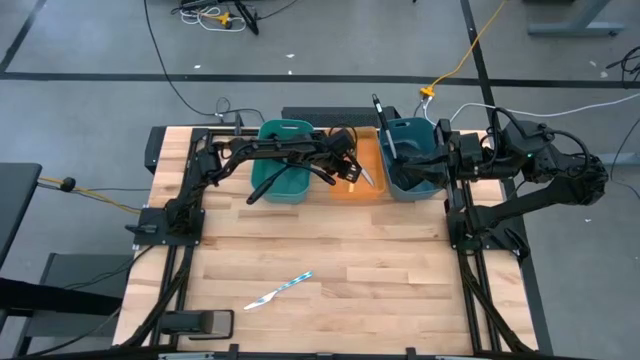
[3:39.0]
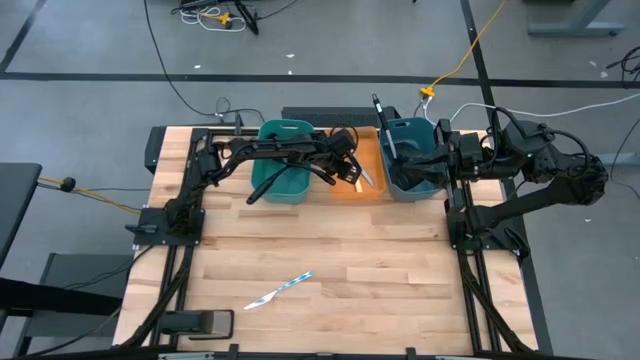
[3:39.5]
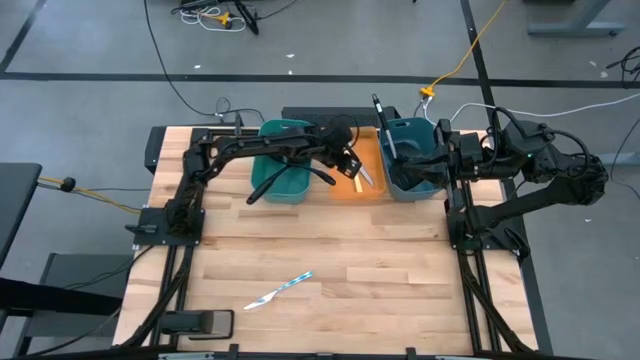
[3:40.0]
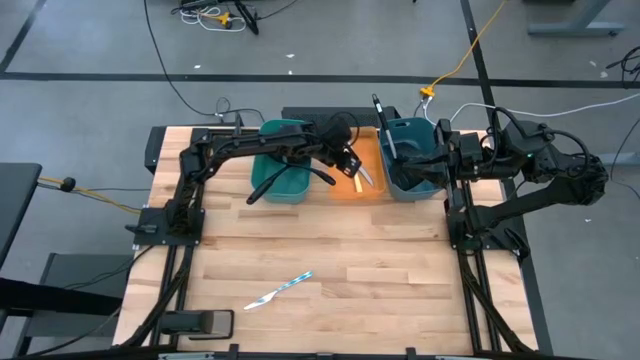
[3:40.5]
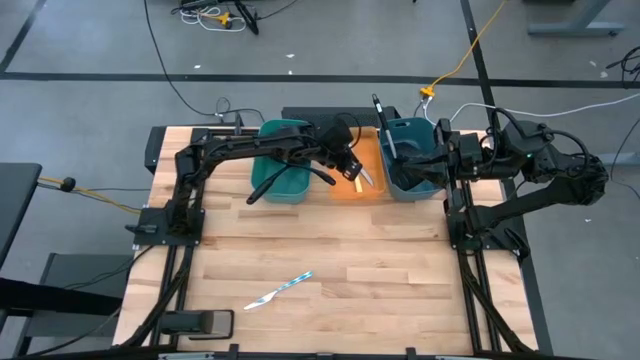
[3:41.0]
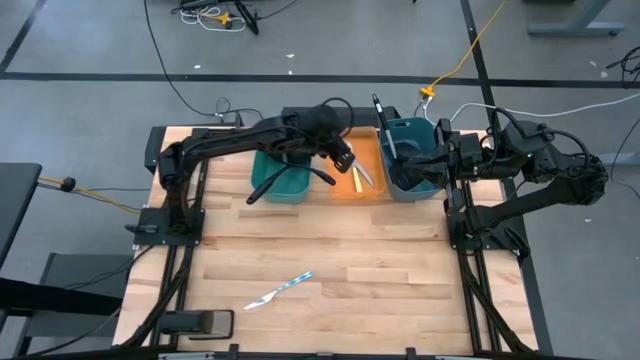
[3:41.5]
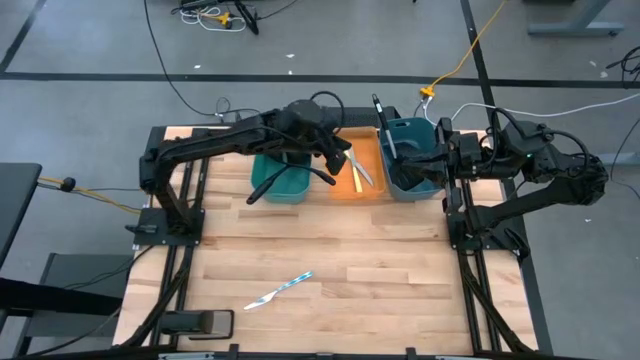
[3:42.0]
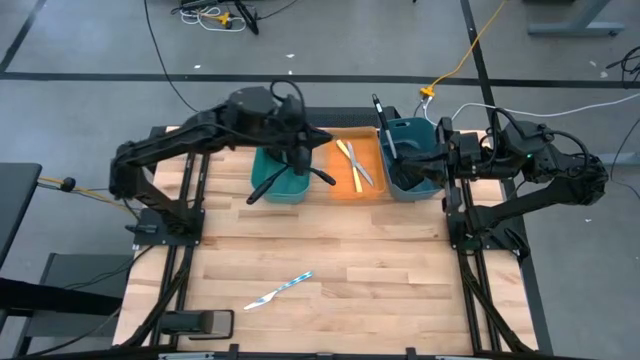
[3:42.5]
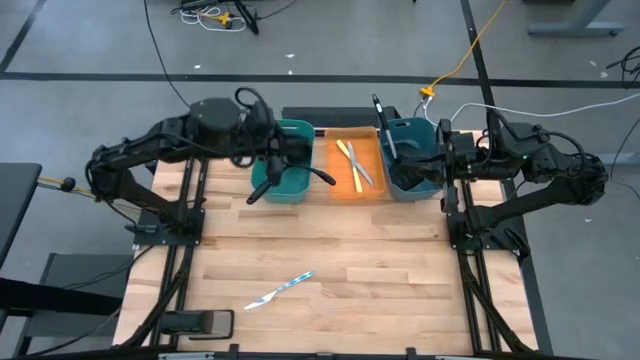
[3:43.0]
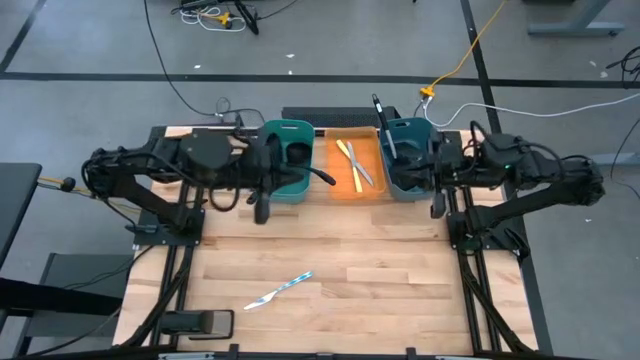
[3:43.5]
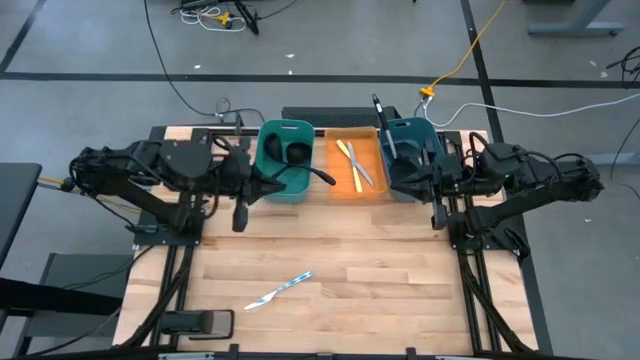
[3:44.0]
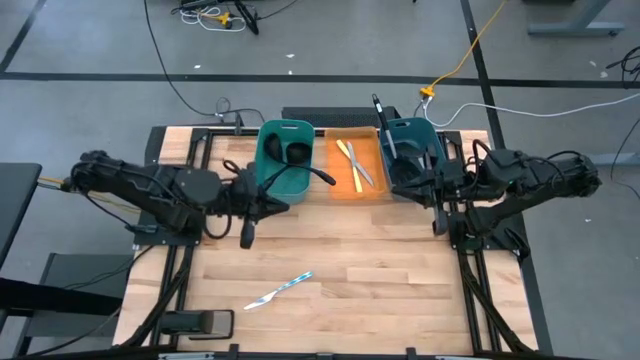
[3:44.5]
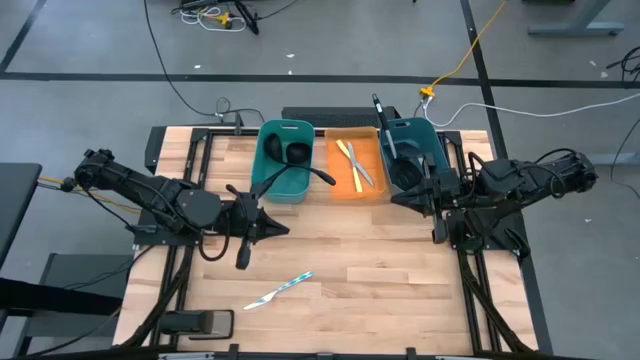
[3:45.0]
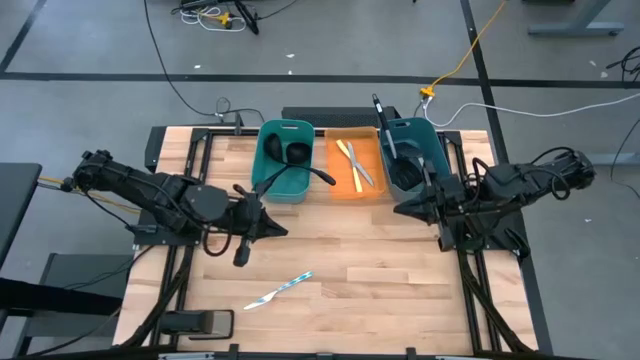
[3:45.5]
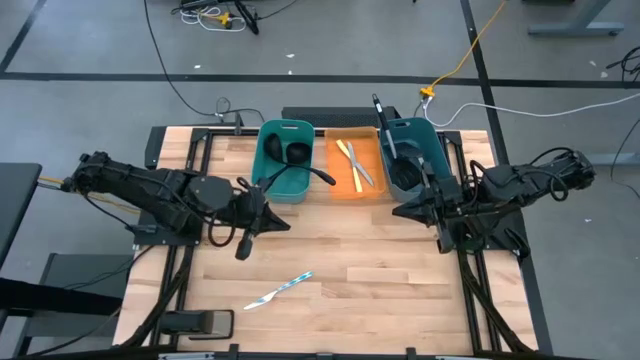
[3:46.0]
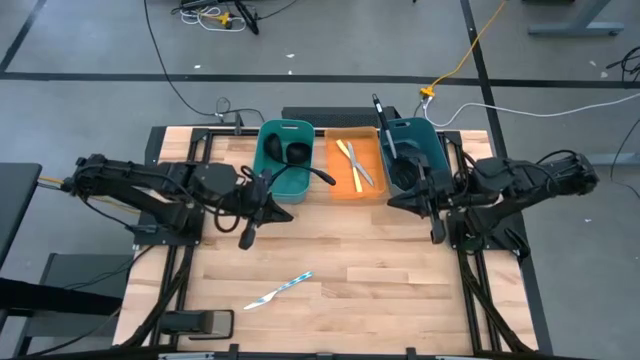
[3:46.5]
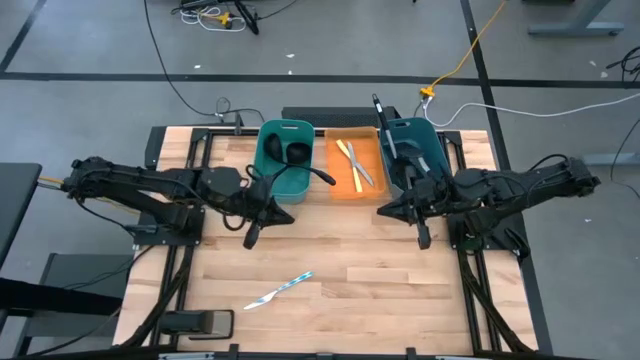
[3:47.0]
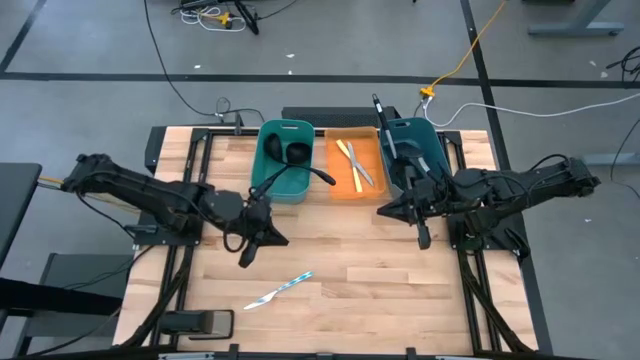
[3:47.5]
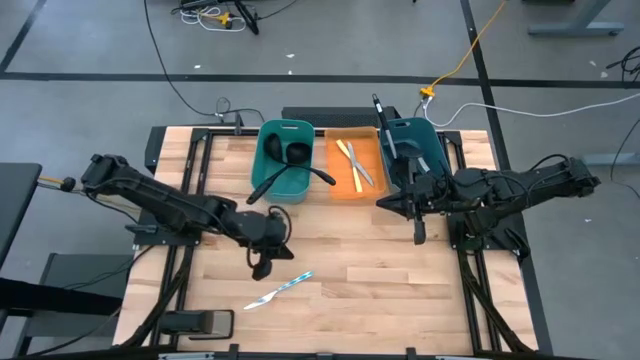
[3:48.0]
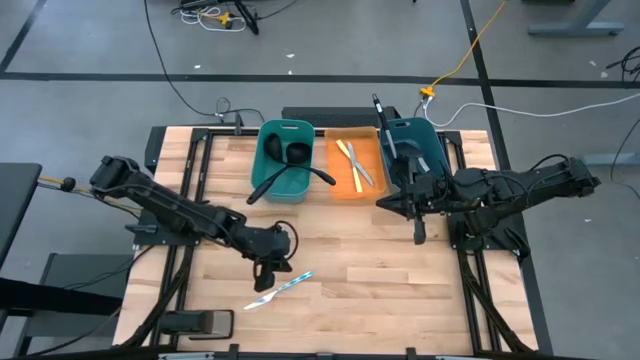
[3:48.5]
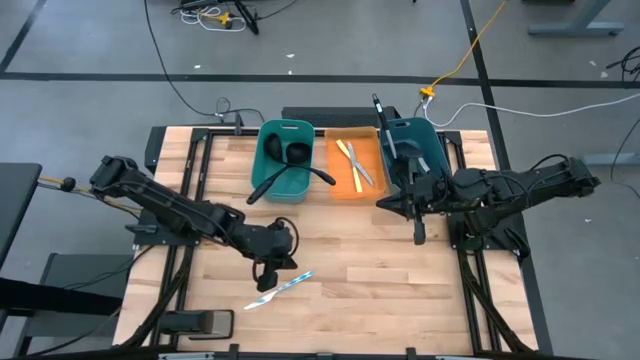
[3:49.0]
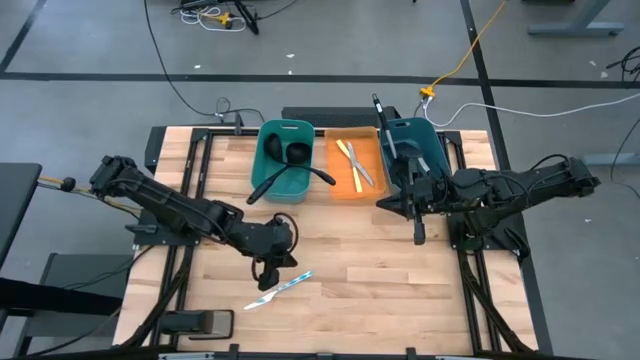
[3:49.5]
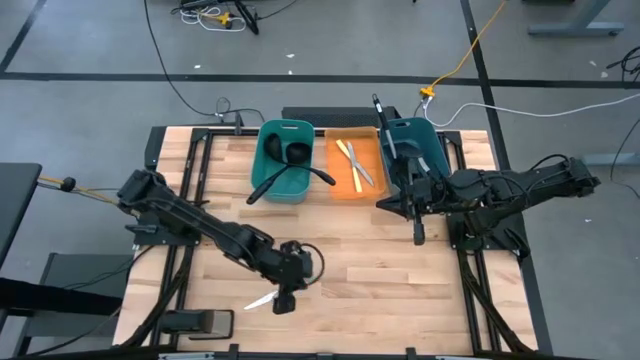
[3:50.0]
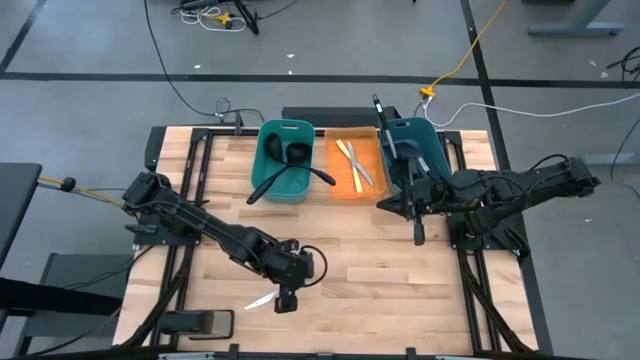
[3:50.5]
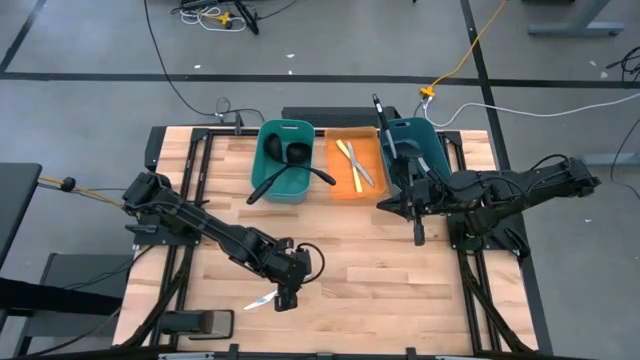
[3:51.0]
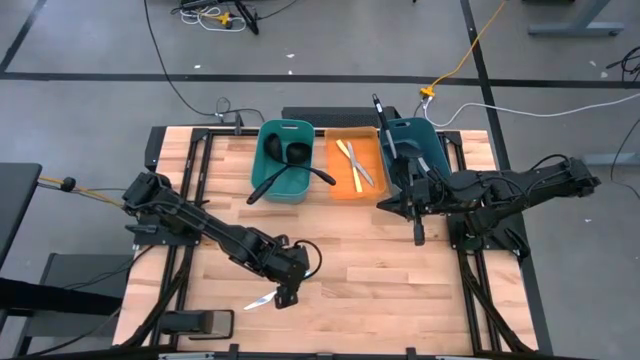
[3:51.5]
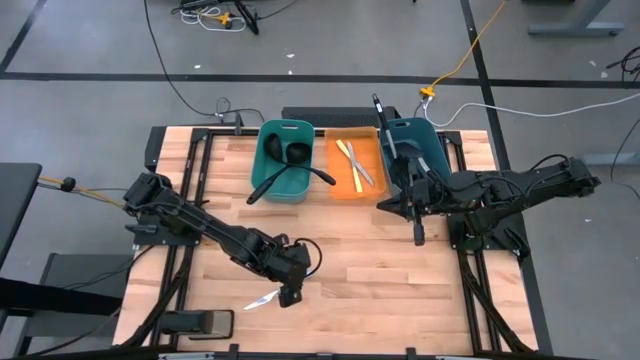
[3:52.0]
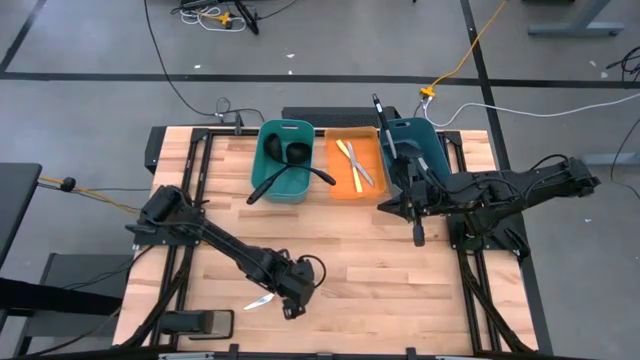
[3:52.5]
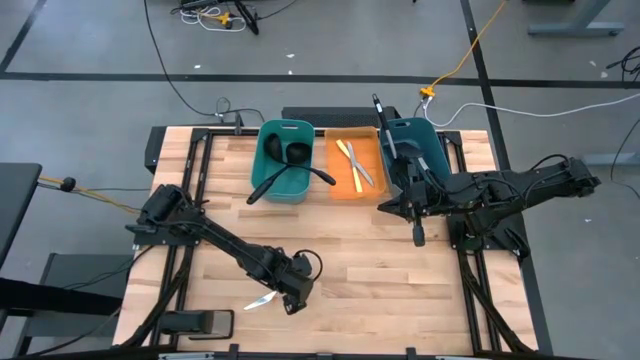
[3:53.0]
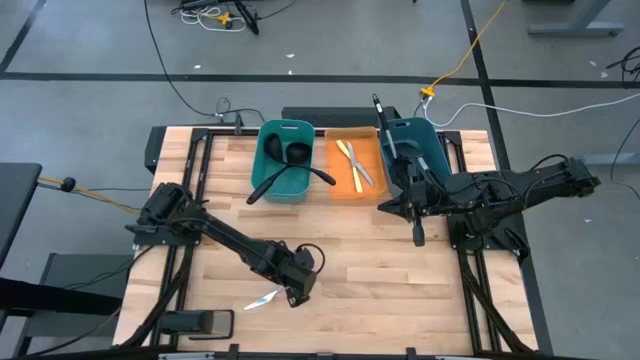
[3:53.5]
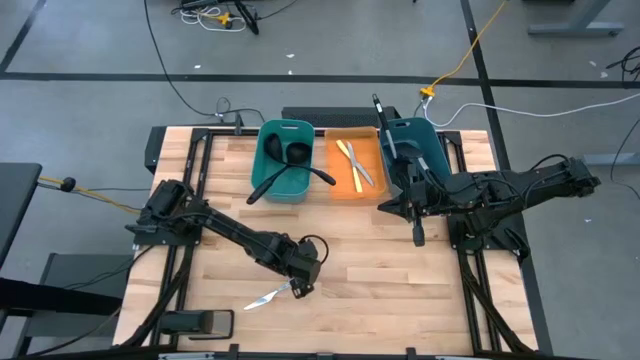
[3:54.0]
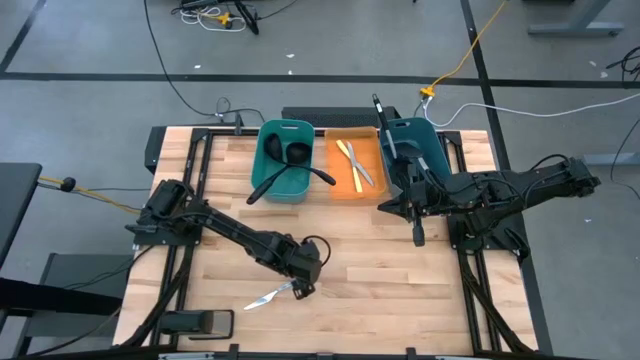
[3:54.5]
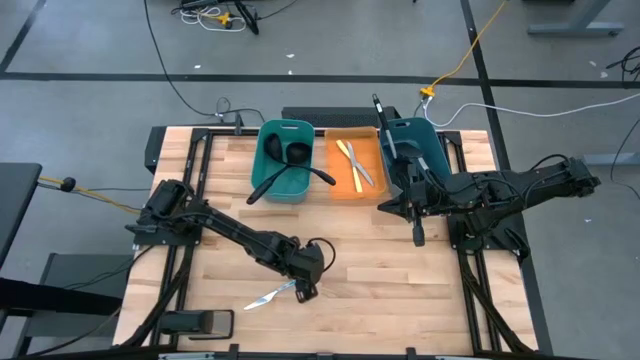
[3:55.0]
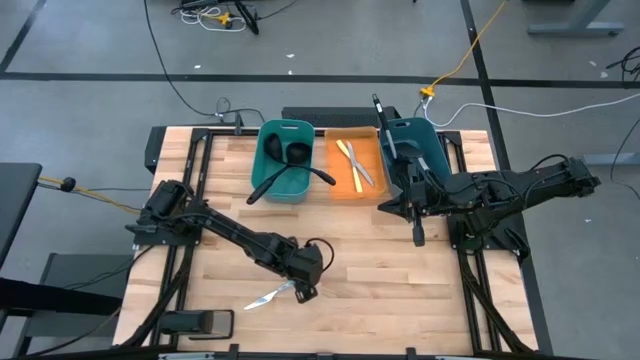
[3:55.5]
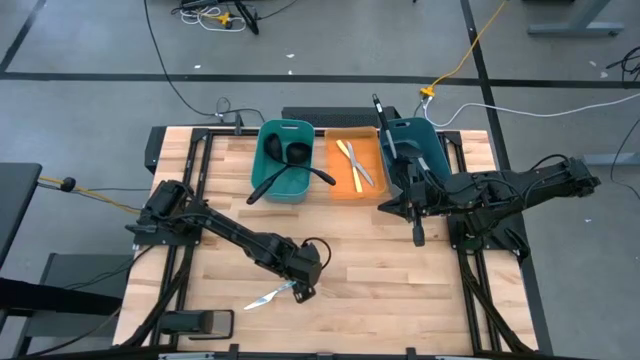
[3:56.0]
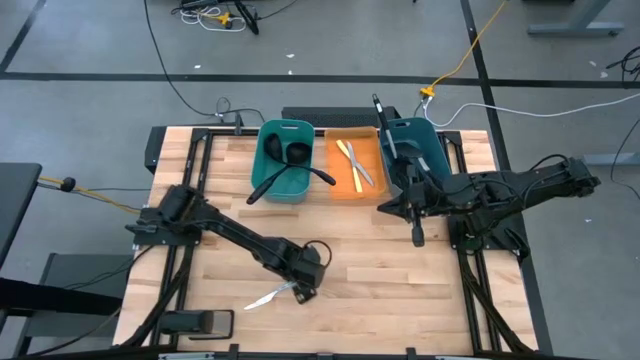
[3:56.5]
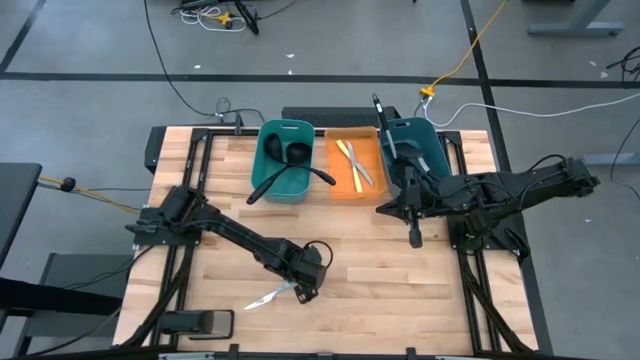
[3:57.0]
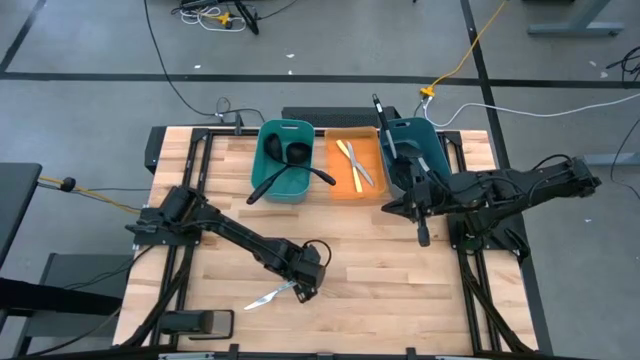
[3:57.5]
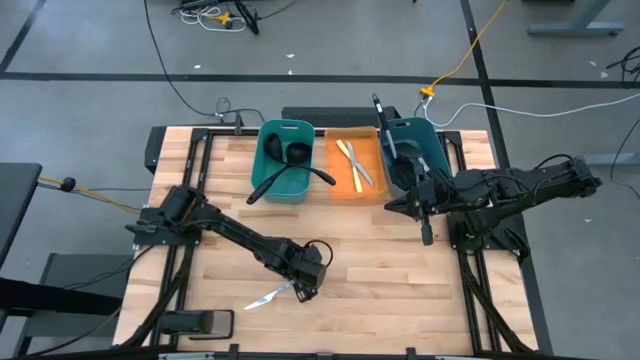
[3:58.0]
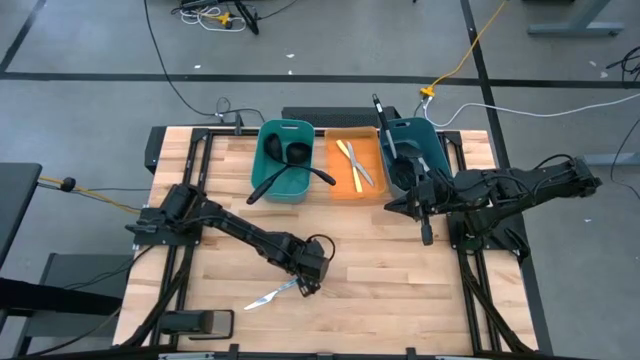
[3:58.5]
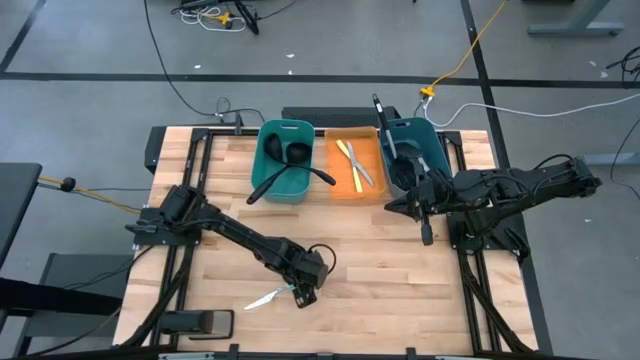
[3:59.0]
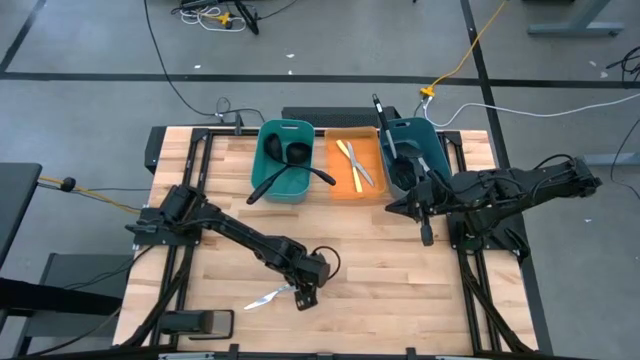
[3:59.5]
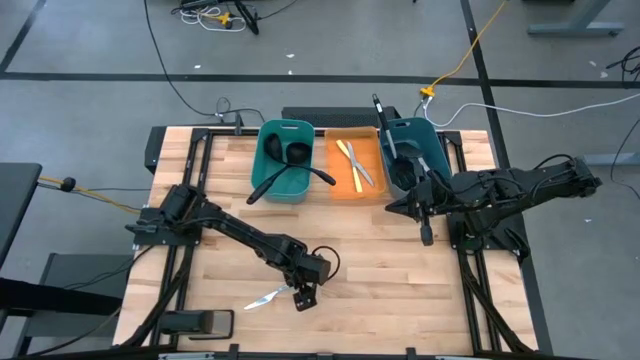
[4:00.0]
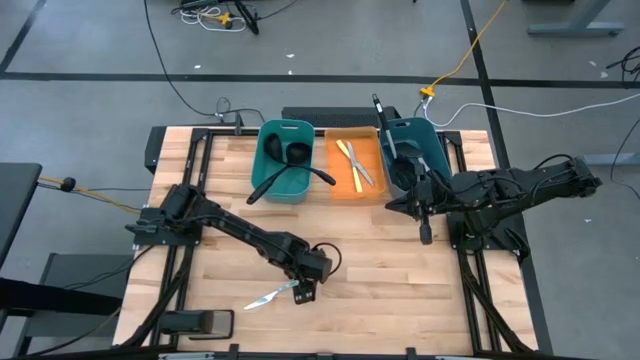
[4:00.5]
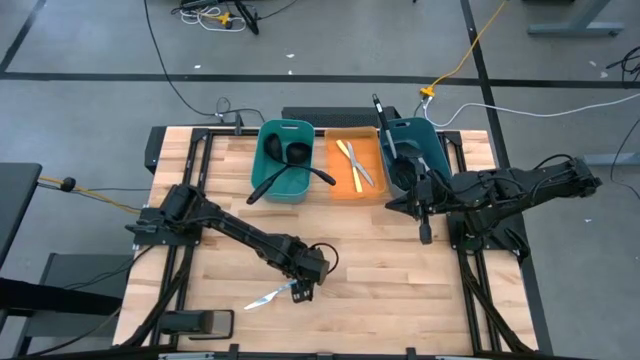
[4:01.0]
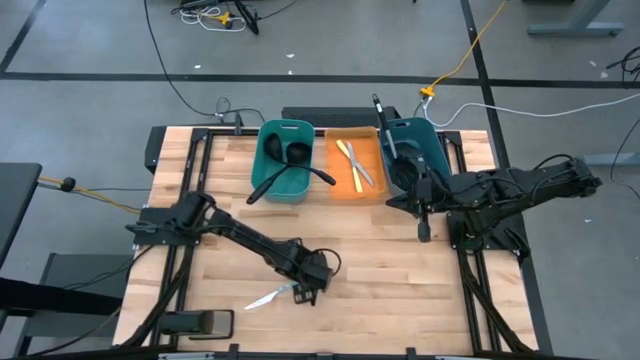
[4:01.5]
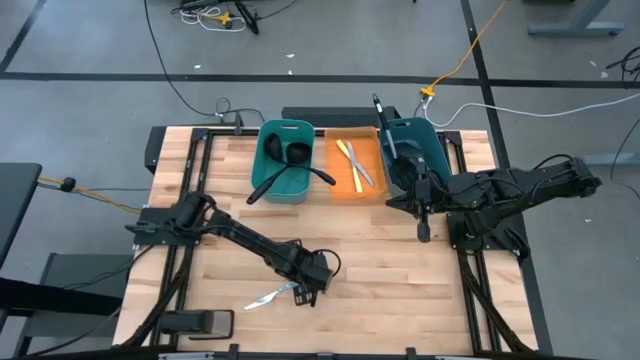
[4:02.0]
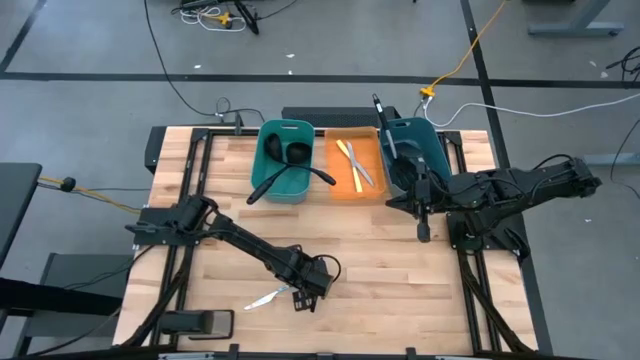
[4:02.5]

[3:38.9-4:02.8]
Task: Pick & Place Kitchen Items
Put the white patterned table knife into the orange bin
